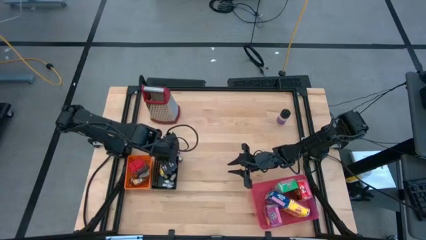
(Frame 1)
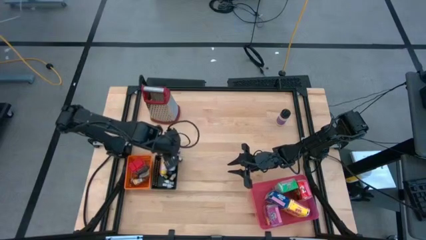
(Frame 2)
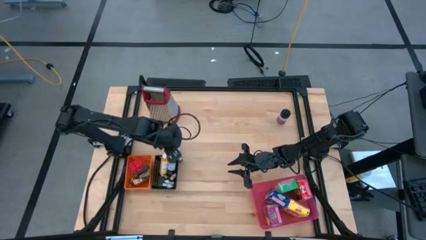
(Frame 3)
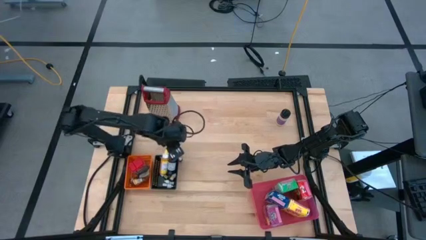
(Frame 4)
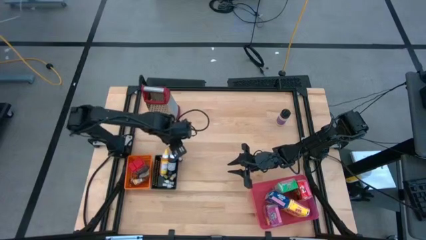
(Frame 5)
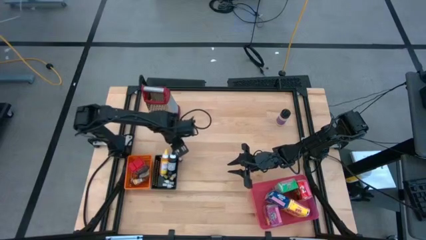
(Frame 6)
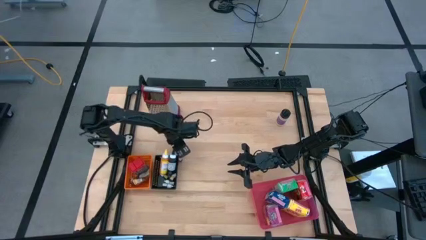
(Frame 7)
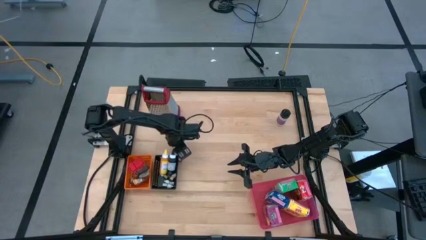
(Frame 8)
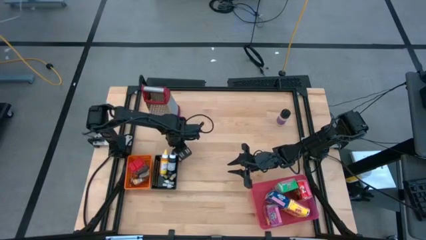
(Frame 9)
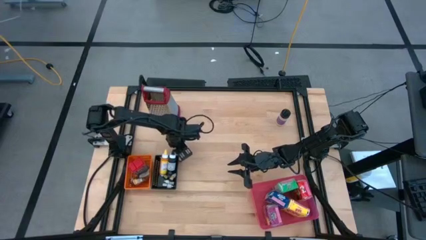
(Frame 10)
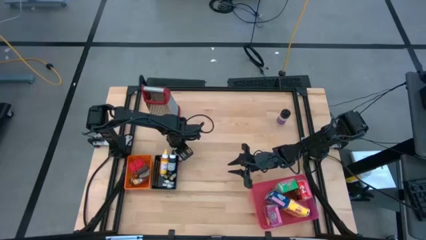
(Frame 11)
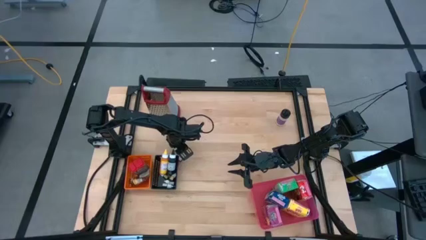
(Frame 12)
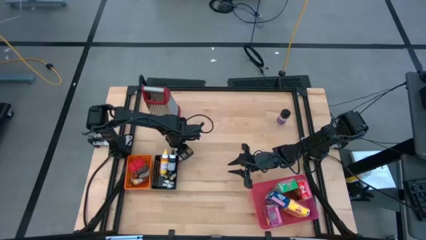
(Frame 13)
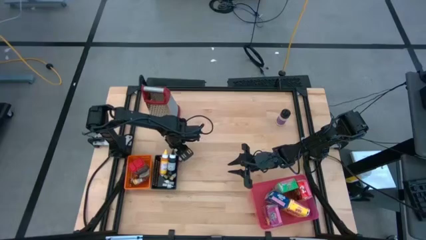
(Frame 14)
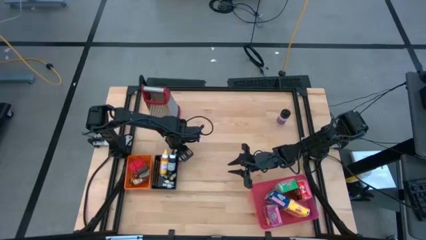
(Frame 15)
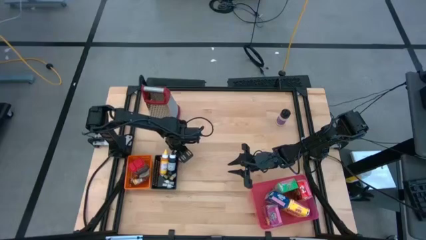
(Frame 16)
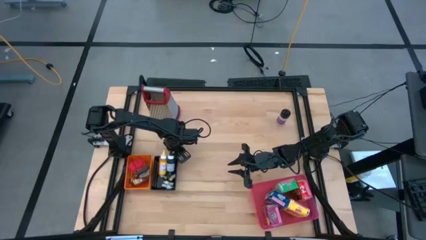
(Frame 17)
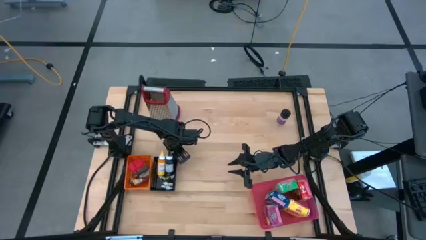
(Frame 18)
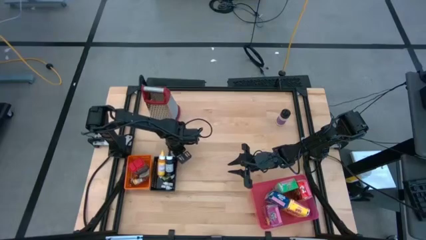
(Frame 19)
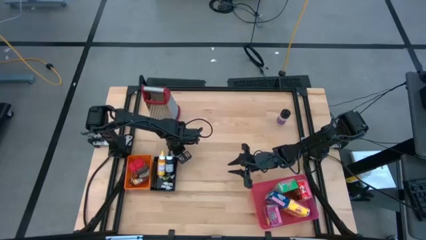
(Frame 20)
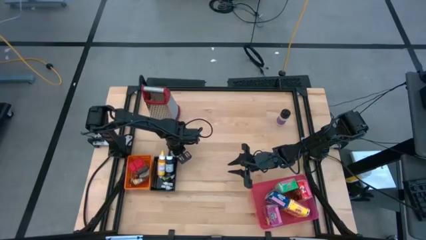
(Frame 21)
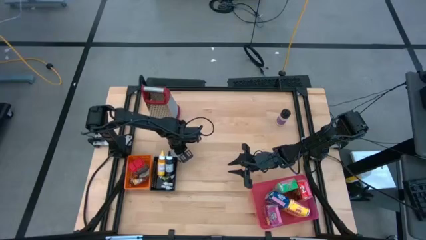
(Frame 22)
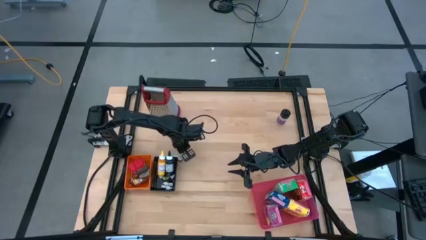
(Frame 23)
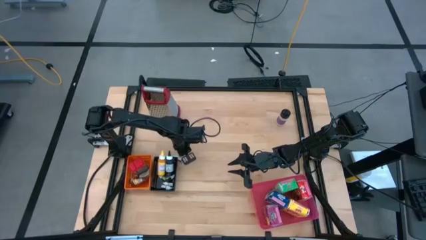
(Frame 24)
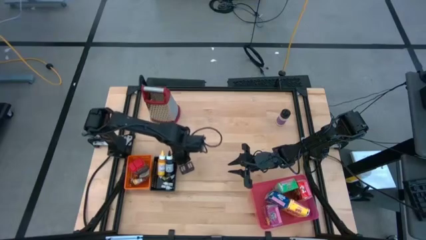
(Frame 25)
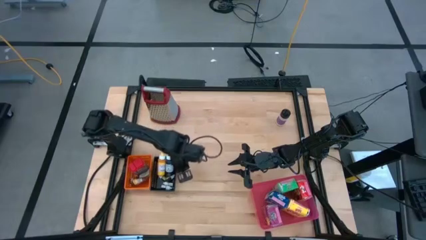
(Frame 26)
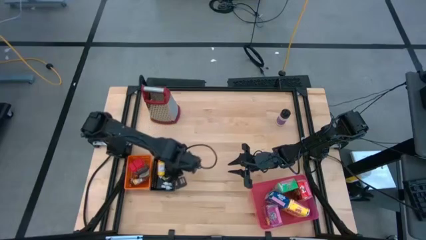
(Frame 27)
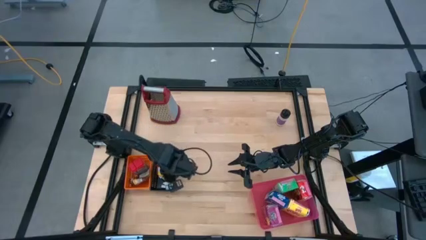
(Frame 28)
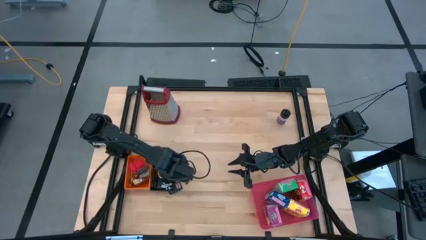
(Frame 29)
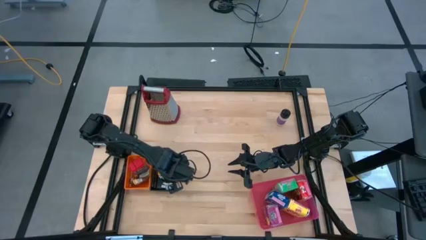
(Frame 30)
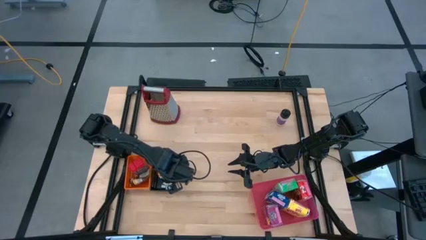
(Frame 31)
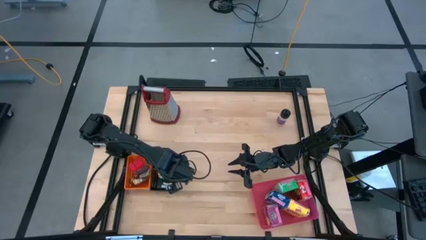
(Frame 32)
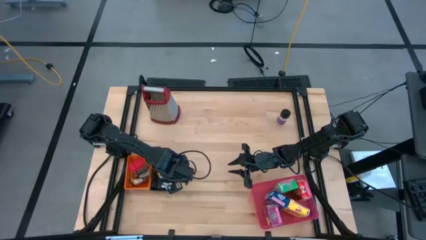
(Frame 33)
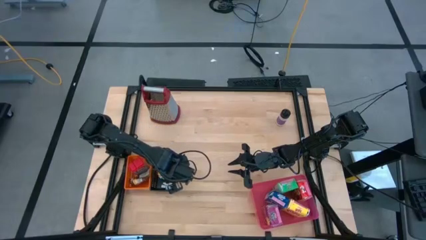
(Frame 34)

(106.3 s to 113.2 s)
Task: Pick & Place Kitchen Items
Put the purple food coloring bottle into the black bin

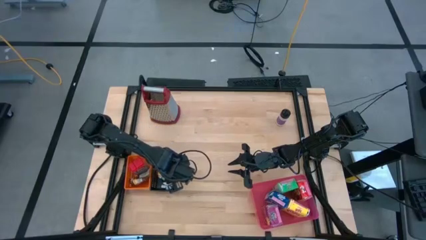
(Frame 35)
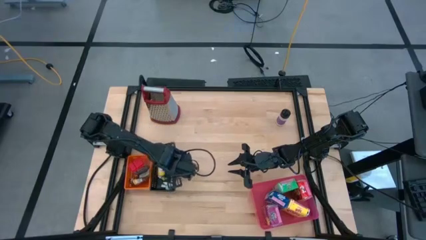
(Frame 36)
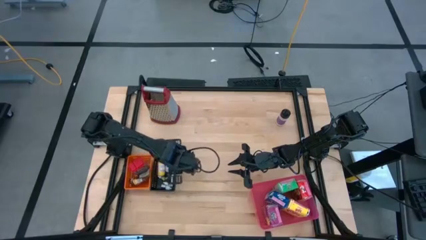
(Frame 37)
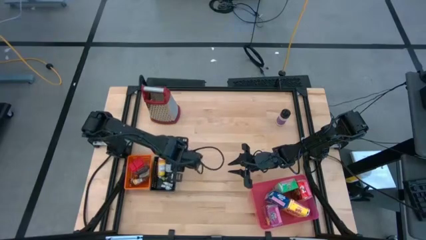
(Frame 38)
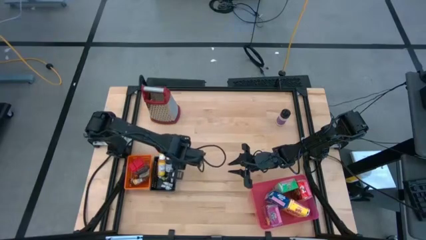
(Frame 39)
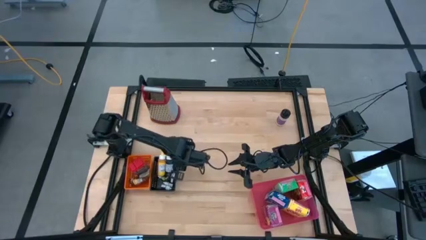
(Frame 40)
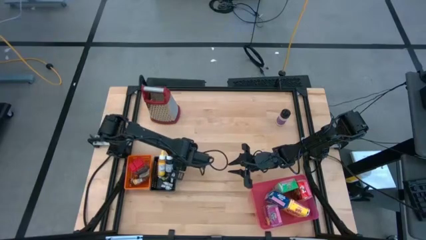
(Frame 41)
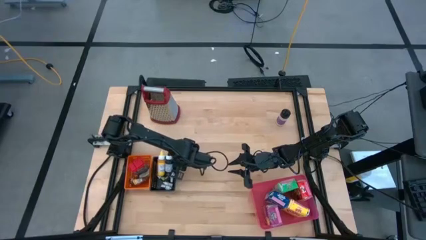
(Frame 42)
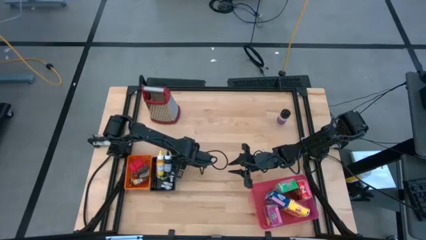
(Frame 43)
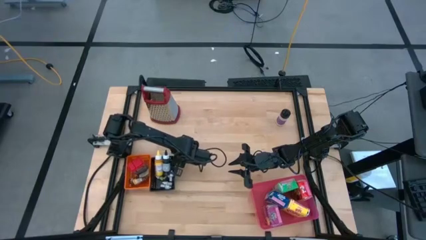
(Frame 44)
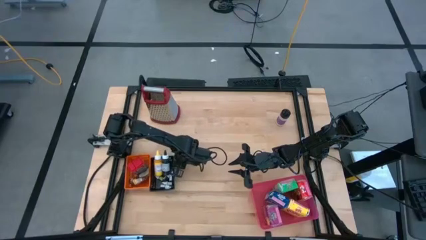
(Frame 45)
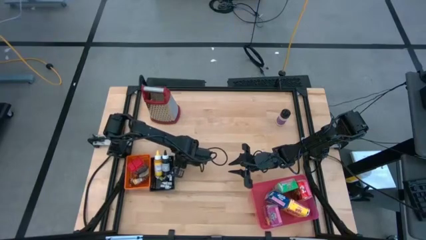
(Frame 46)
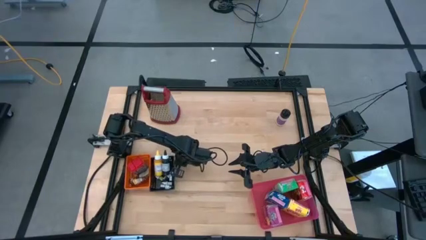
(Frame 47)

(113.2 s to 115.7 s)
Put the yellow and red food coloring bottle into the black bin

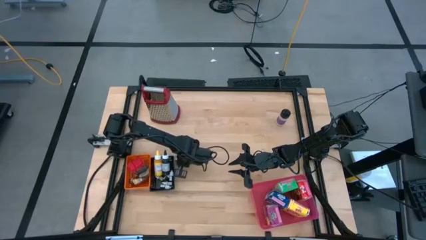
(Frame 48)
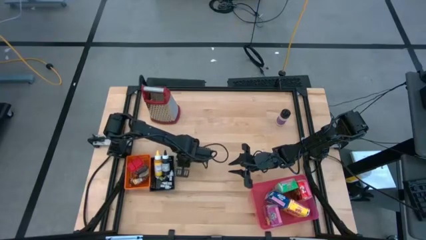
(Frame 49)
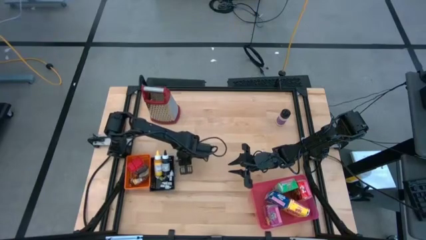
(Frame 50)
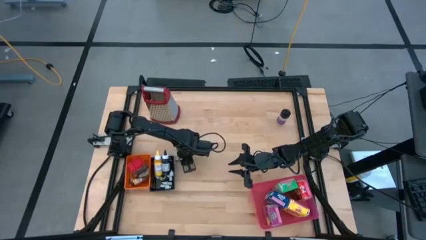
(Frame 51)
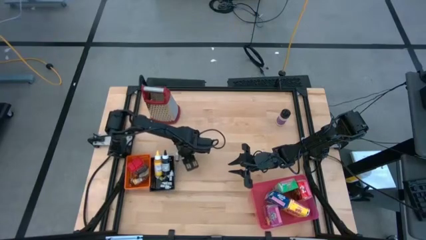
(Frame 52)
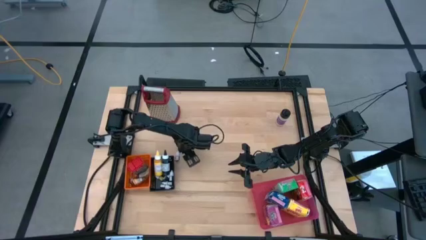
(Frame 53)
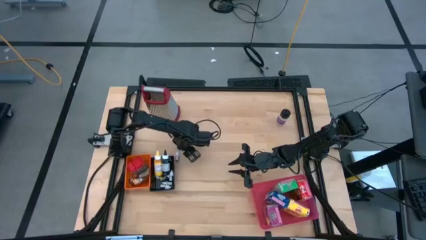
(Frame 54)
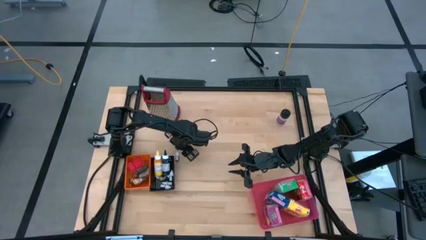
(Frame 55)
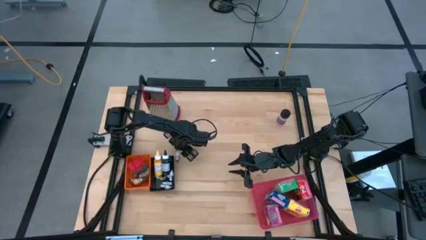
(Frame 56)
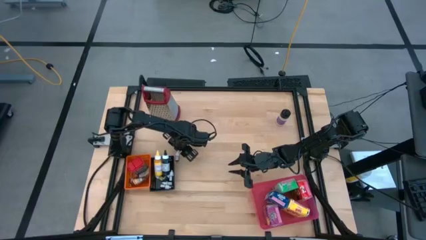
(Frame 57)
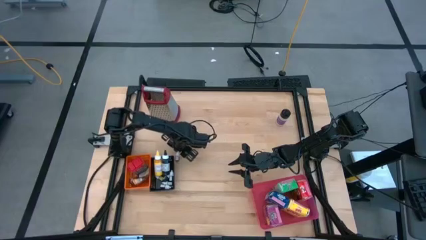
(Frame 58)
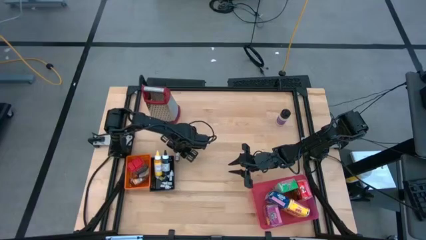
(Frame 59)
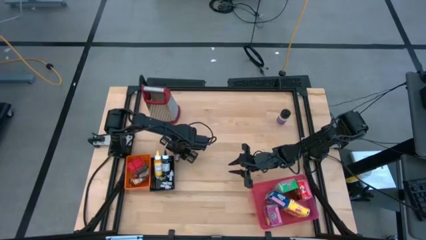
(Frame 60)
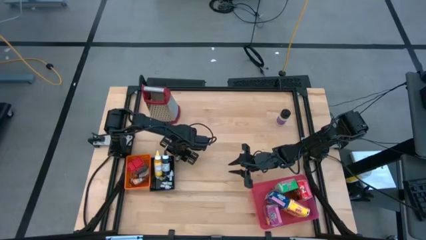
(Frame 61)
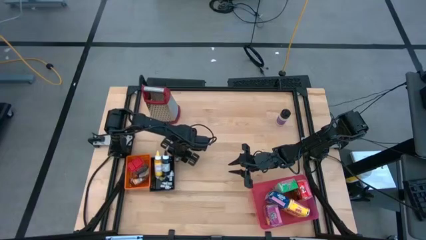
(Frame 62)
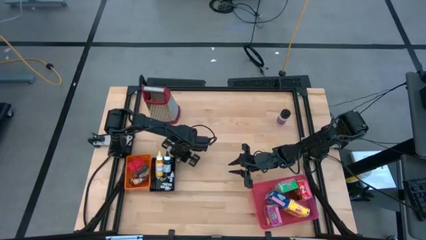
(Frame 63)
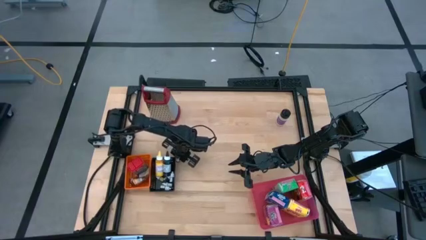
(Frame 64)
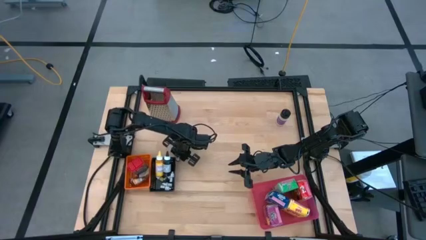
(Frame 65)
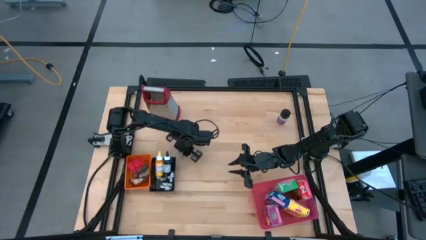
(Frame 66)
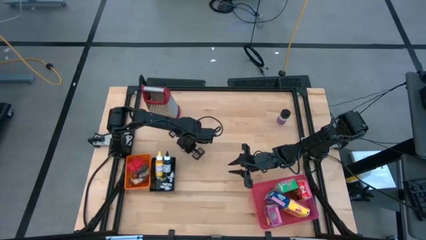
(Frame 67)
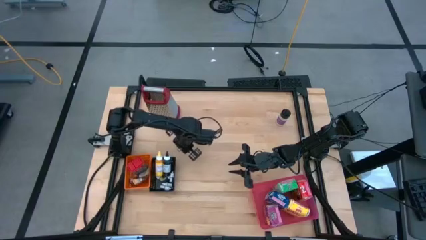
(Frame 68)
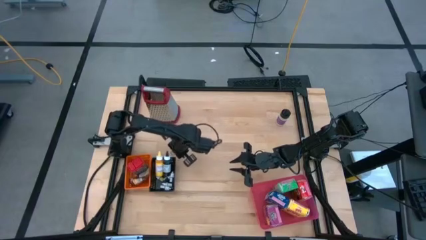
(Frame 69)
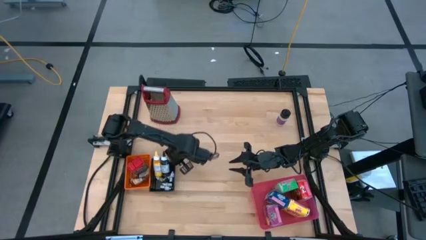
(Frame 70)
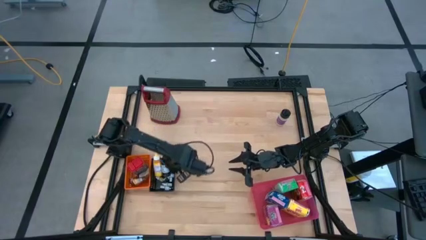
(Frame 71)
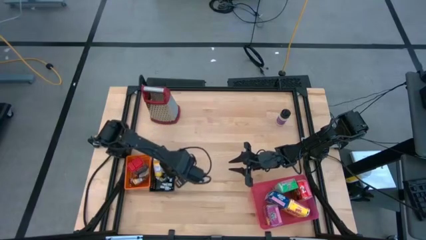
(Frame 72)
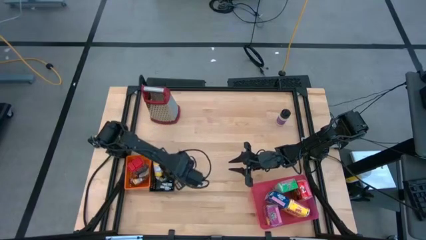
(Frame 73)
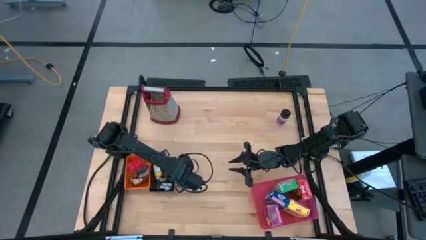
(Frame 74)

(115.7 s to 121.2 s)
Put the yellow and red food coloring bottle into the black bin
